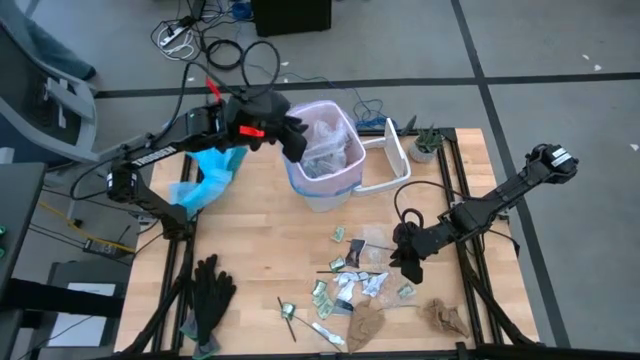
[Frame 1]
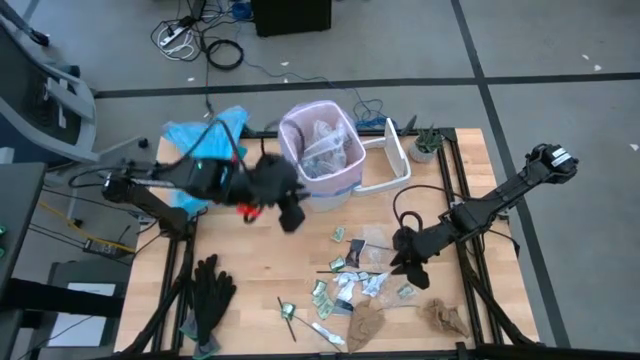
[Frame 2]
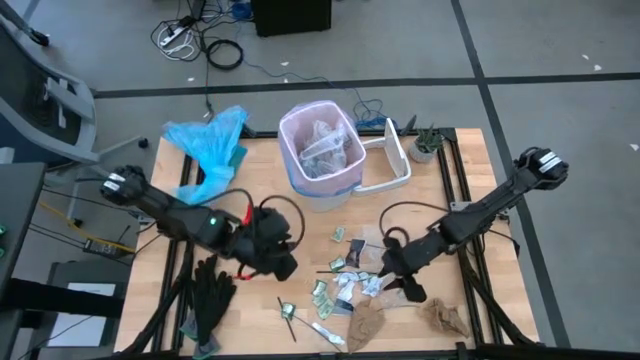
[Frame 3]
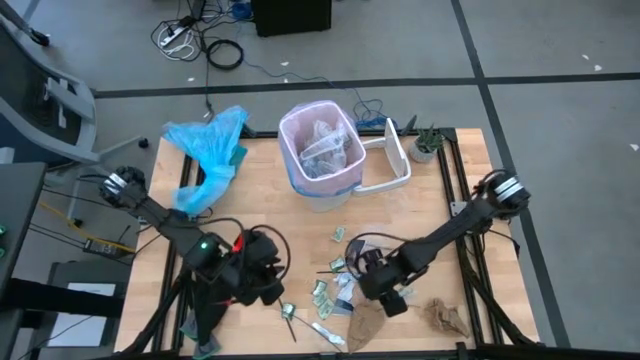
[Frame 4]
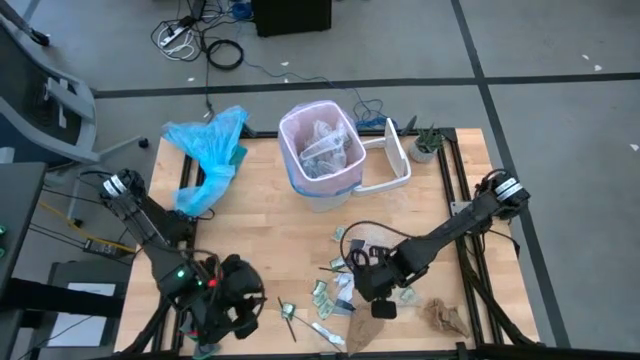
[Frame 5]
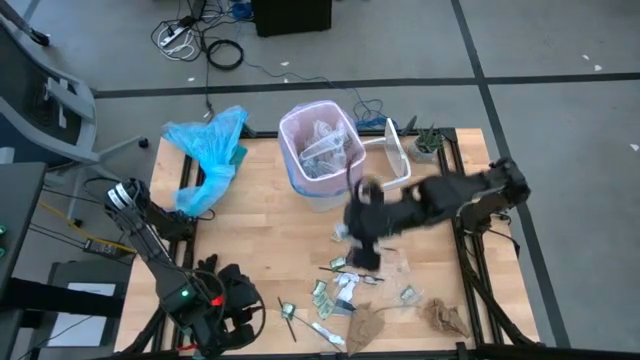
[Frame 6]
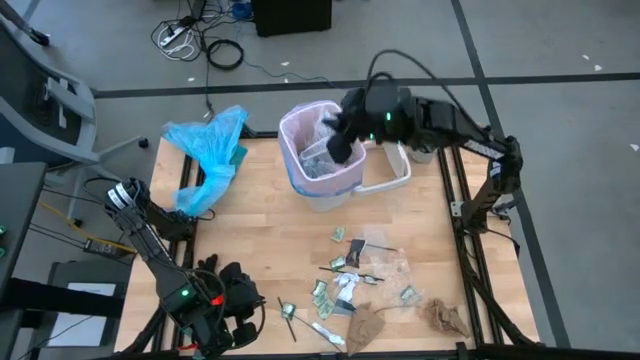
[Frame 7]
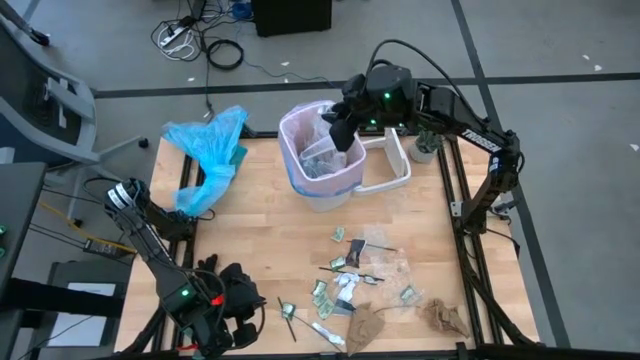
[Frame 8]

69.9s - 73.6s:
Task: place trash/remove bag and relplace
Put the white paper into the trash bin

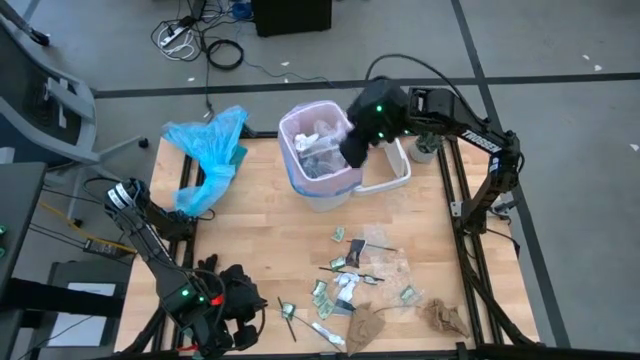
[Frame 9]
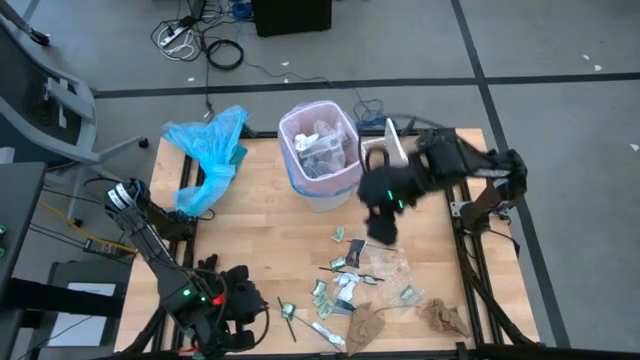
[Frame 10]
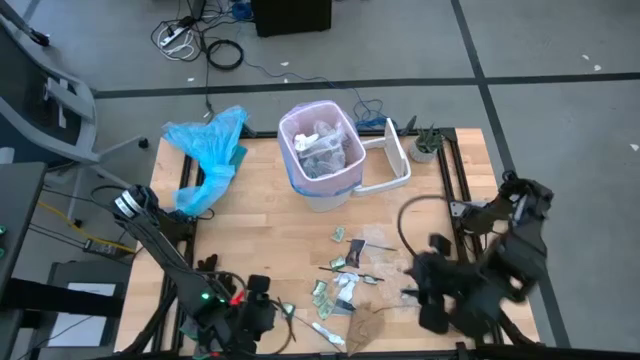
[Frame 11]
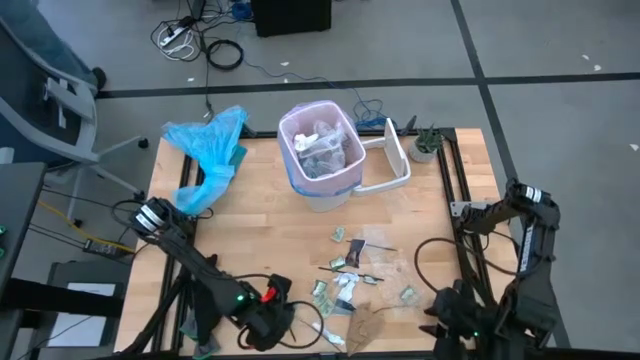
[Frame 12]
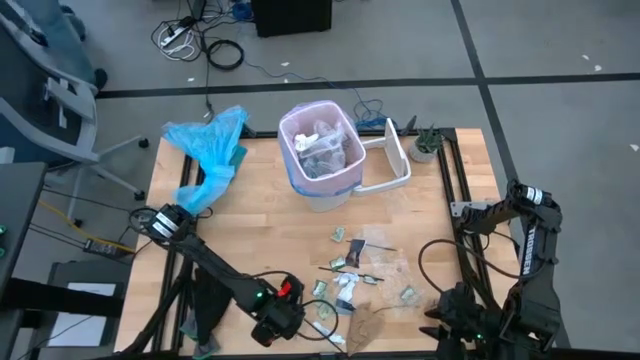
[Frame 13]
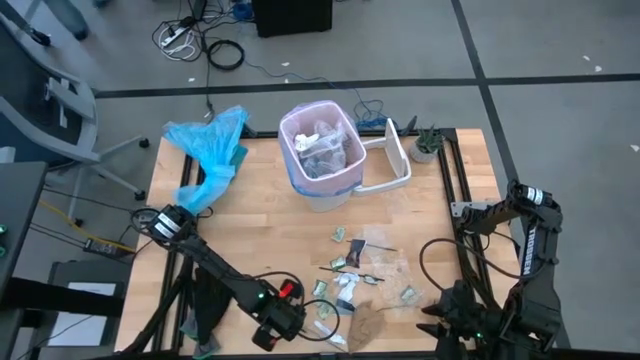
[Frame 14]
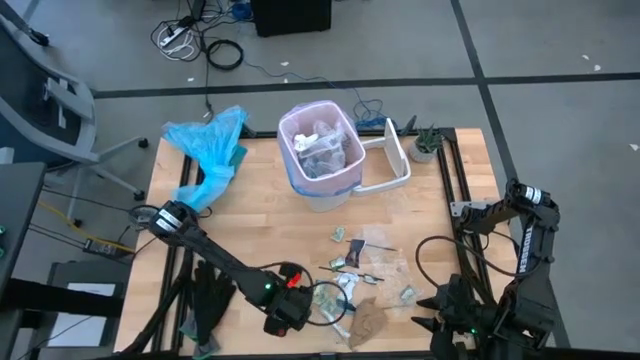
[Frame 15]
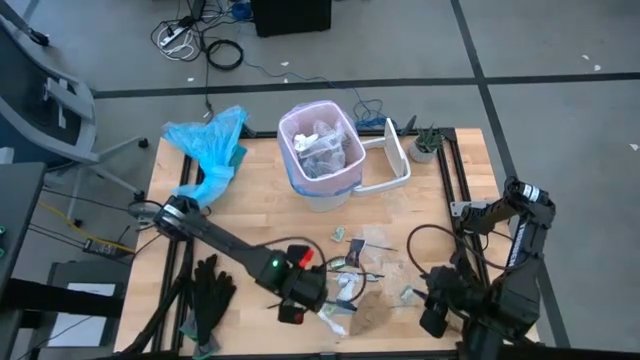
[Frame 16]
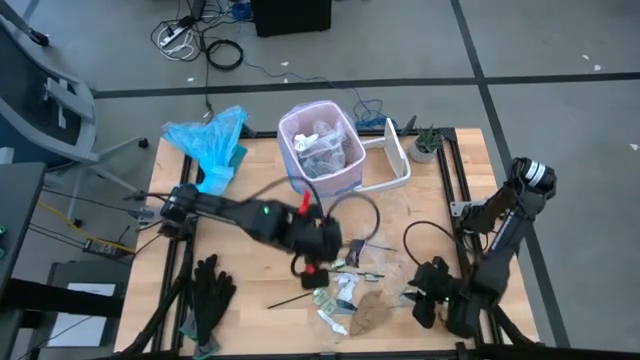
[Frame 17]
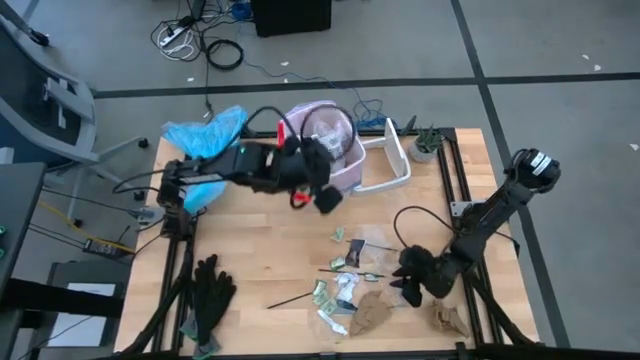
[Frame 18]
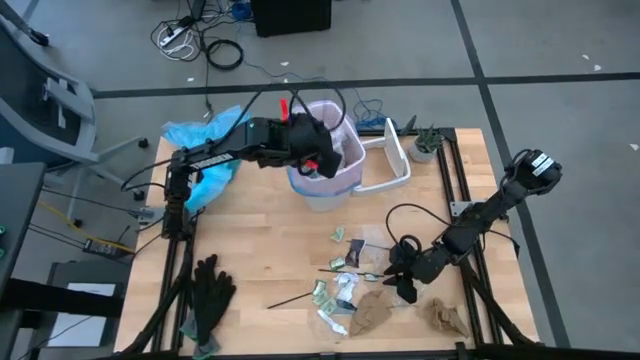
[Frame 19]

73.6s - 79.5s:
Put the green plastic material and the bottom middle black cable tie into the trash bin

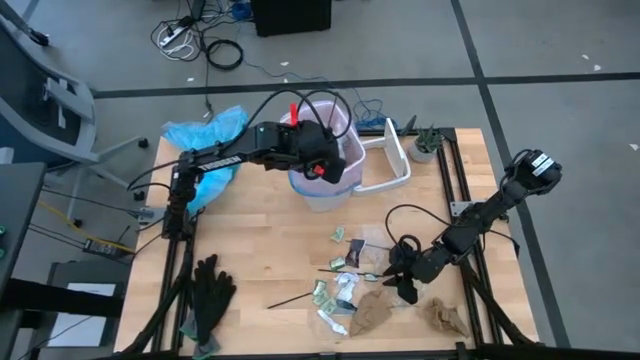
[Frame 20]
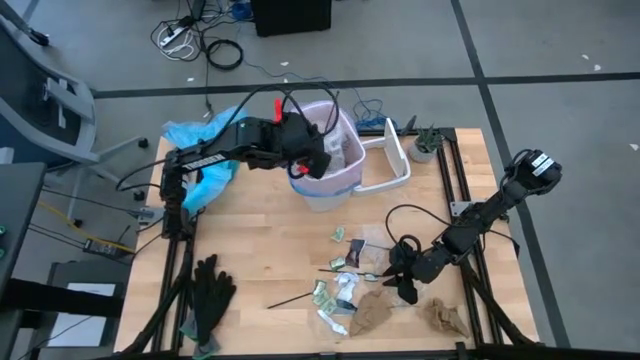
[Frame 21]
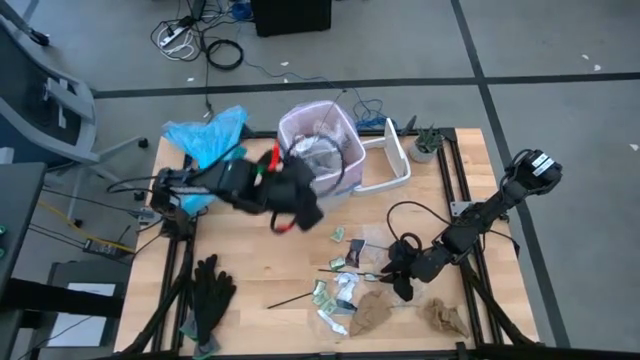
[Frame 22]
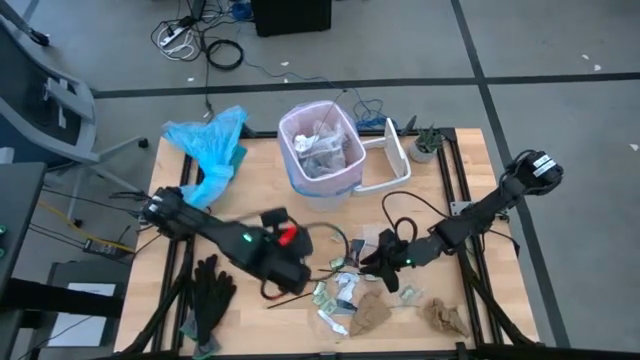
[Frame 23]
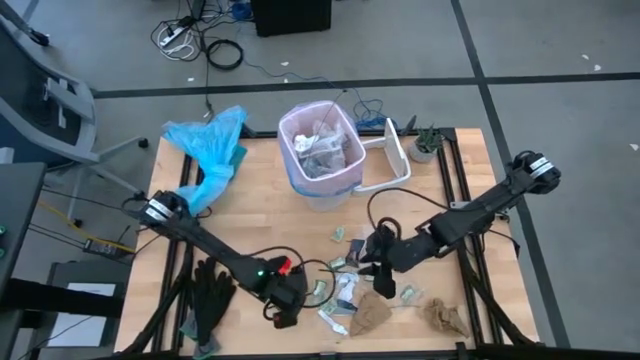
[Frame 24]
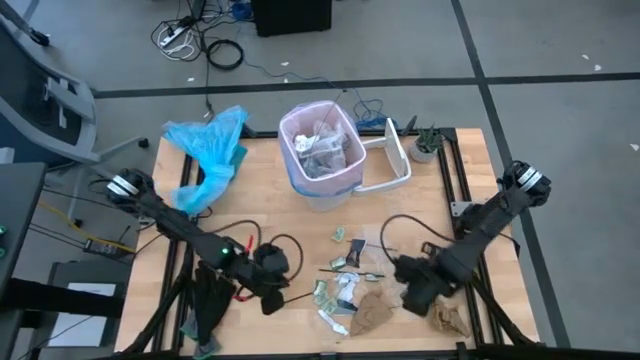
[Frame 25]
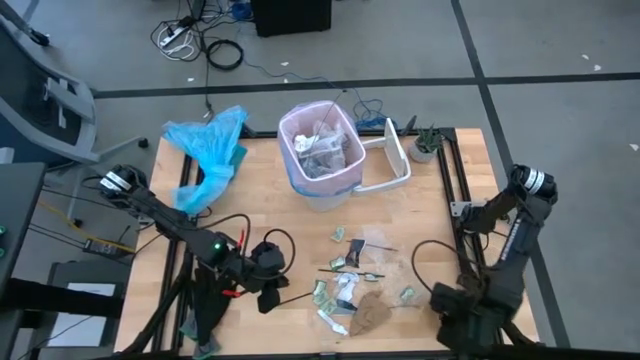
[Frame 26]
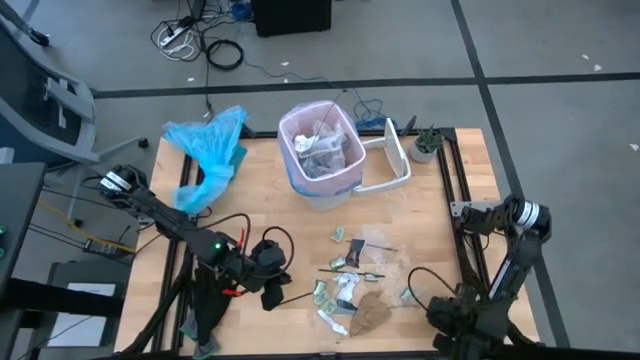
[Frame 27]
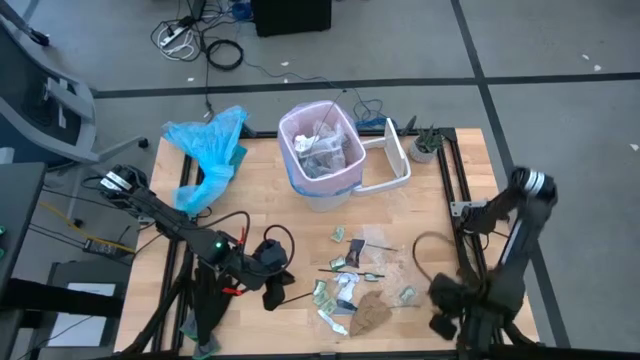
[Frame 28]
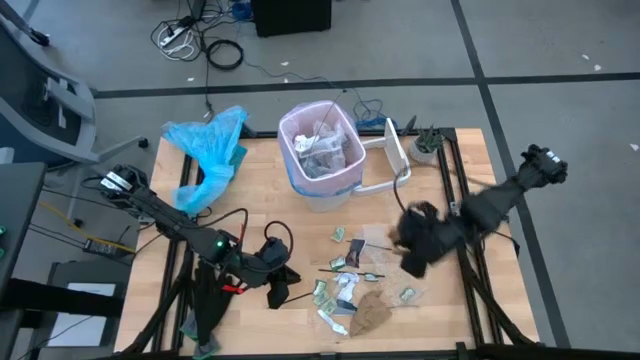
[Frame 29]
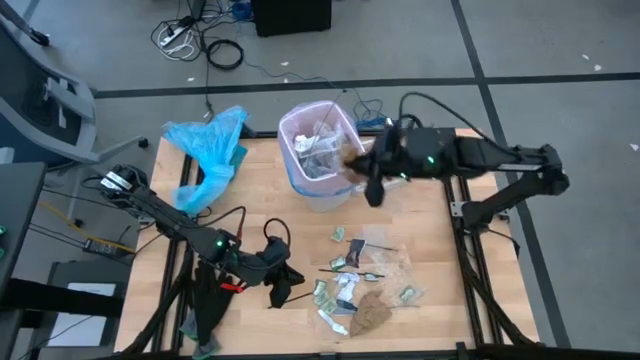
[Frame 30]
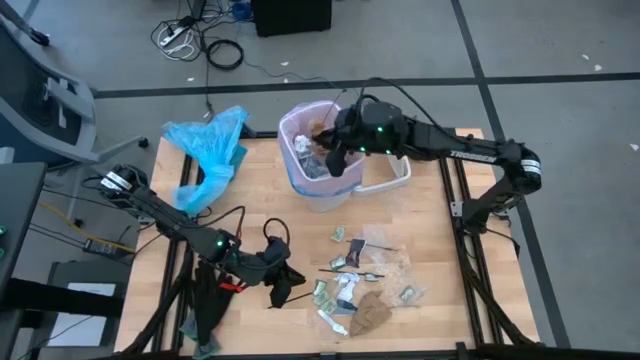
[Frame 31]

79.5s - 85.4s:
Put the brown napkin into the trash bin

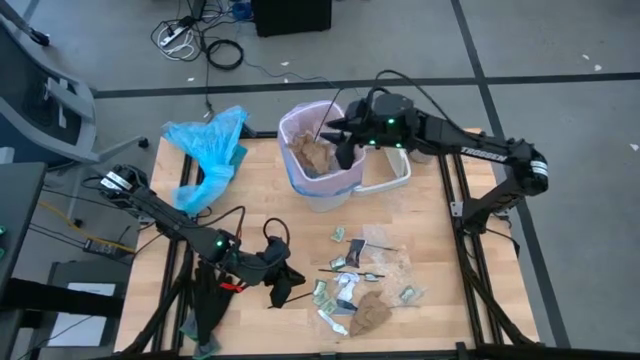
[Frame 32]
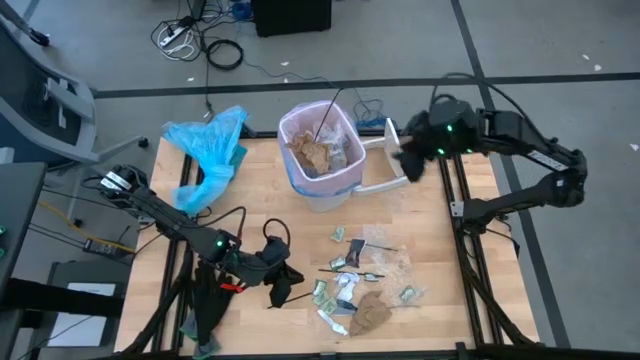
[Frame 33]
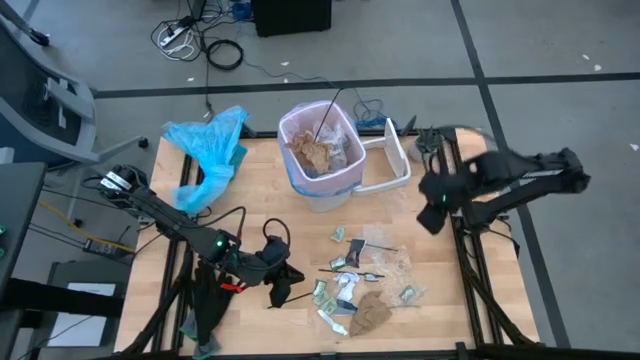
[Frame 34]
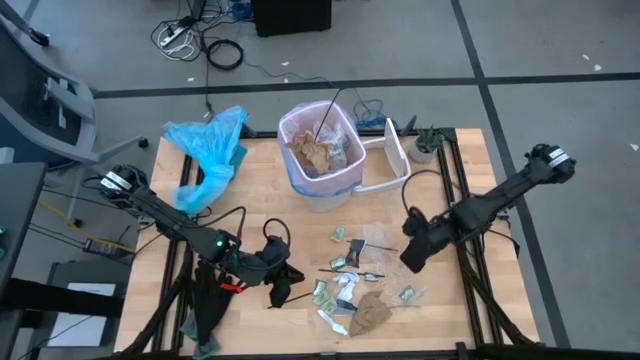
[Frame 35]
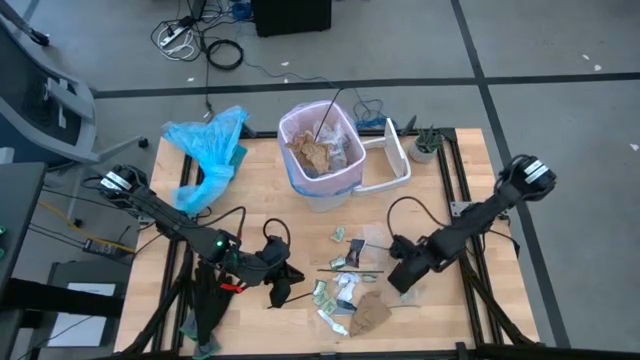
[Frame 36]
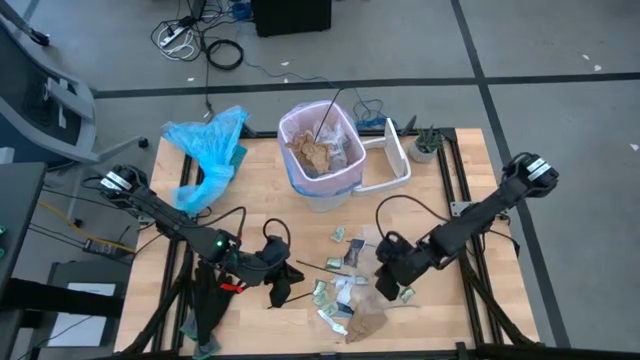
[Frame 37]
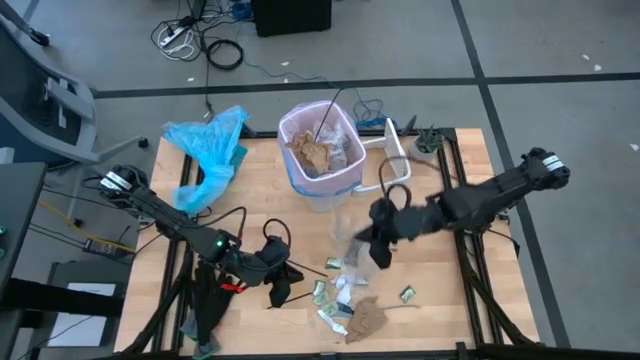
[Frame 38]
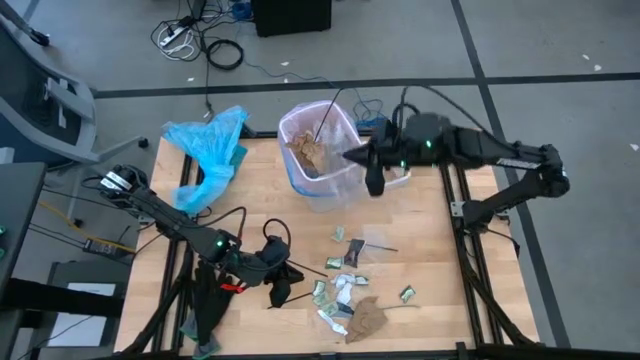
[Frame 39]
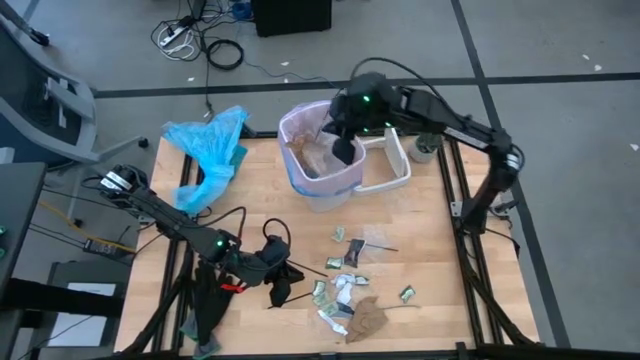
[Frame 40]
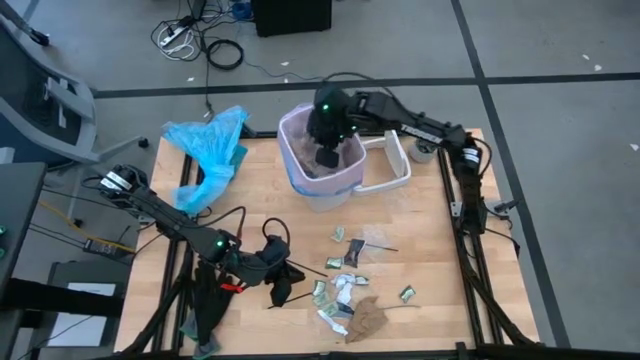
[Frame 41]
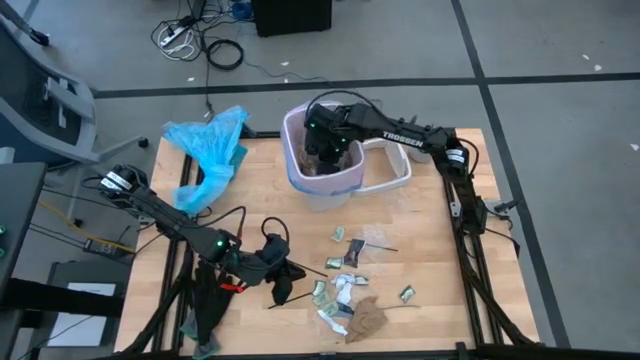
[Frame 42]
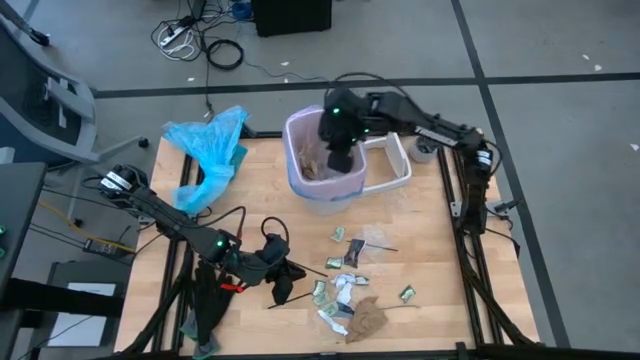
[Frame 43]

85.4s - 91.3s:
Put the clear cellophane into the trash bin

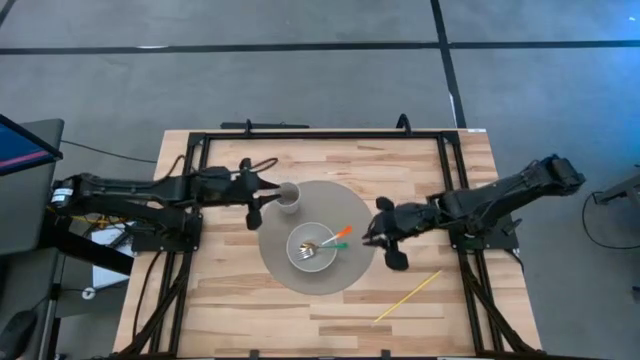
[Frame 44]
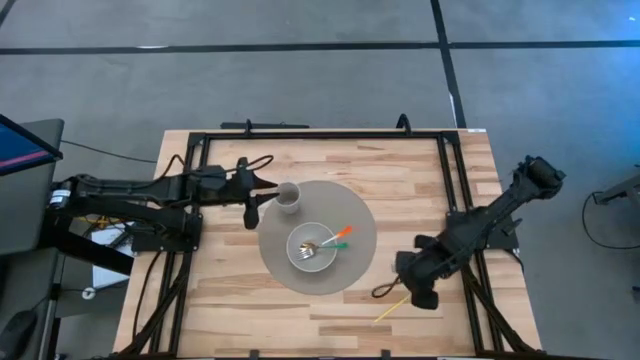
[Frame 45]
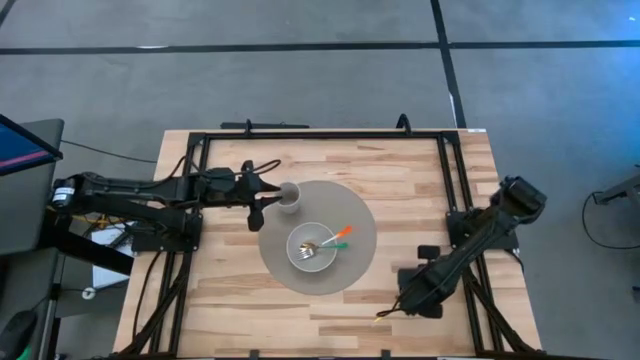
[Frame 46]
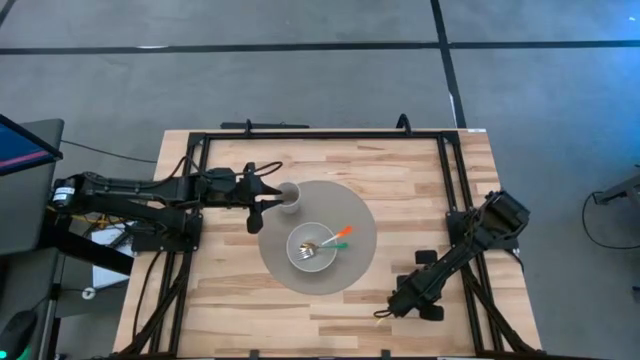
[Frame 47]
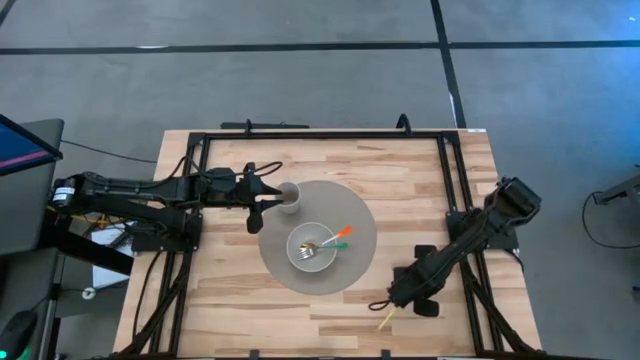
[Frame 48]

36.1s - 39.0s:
Task: Pick & Place Utensil
Put the yellow straw into the gray cup on the gray placemat
